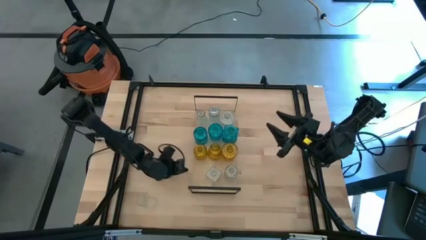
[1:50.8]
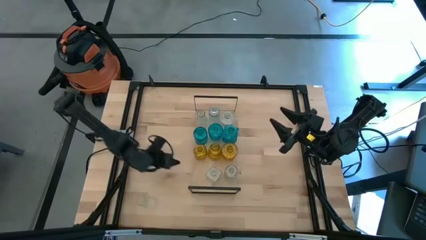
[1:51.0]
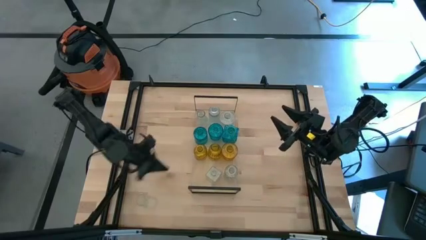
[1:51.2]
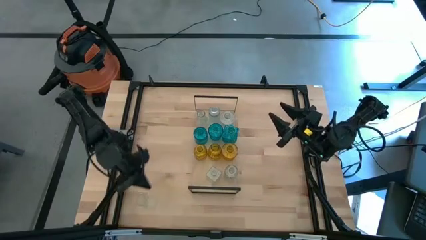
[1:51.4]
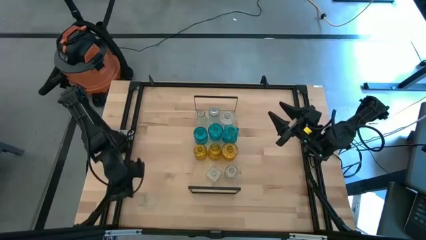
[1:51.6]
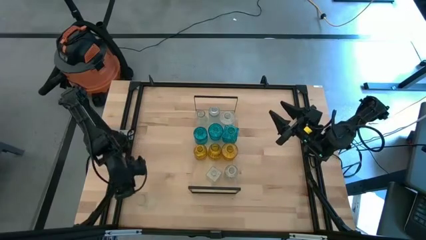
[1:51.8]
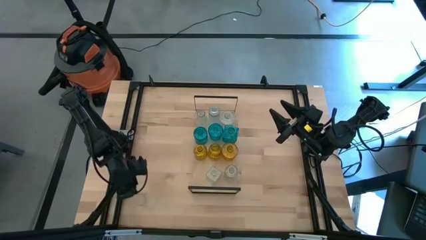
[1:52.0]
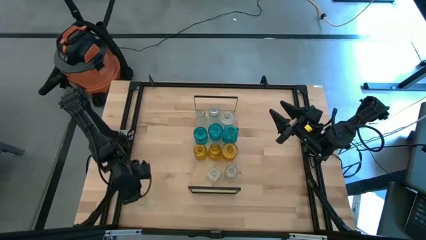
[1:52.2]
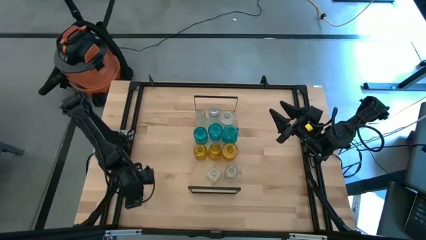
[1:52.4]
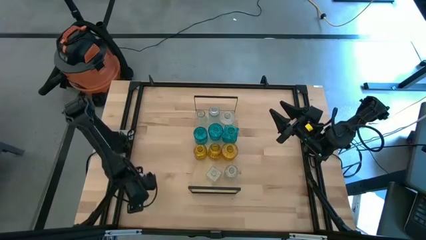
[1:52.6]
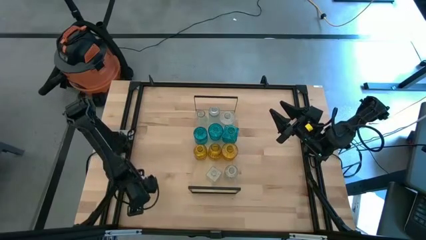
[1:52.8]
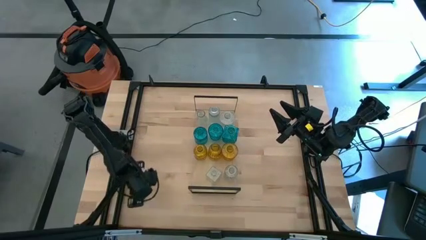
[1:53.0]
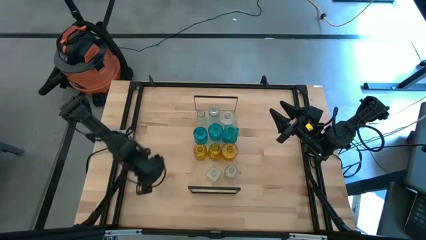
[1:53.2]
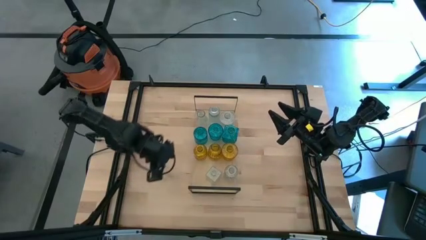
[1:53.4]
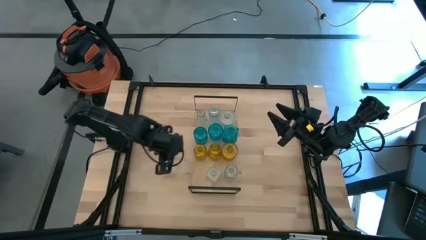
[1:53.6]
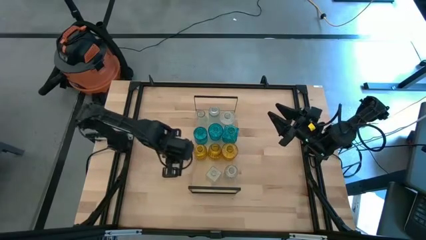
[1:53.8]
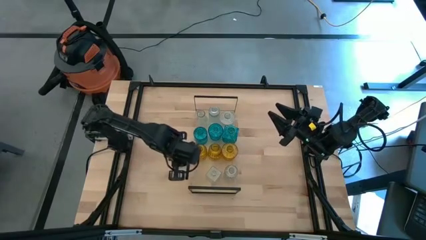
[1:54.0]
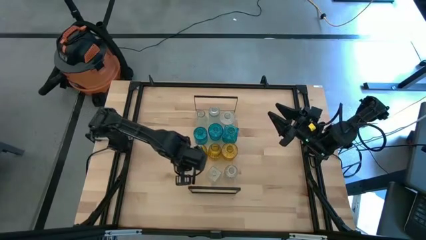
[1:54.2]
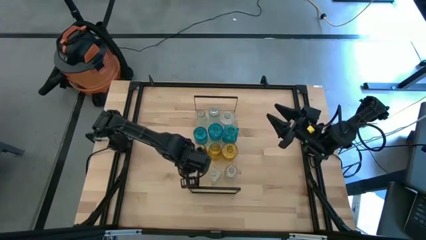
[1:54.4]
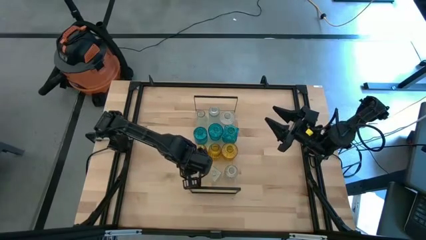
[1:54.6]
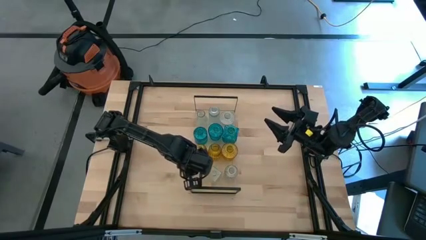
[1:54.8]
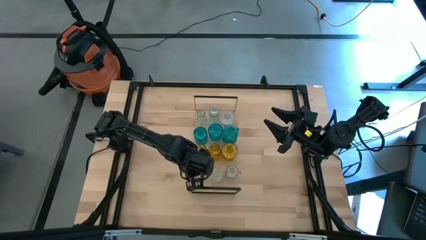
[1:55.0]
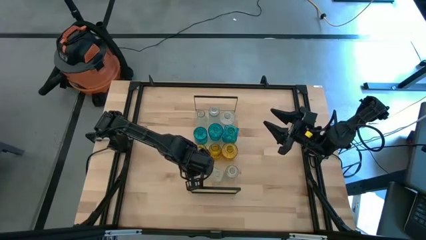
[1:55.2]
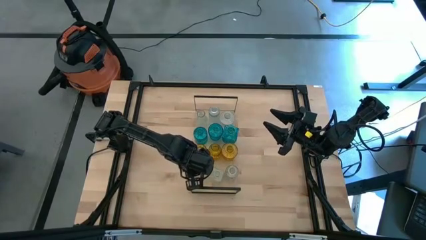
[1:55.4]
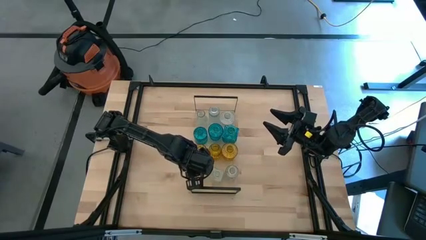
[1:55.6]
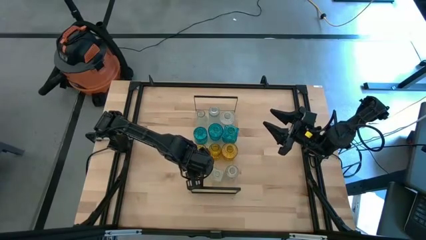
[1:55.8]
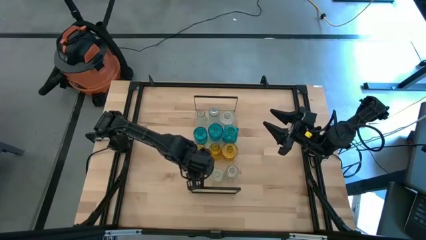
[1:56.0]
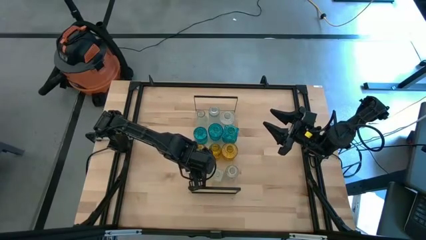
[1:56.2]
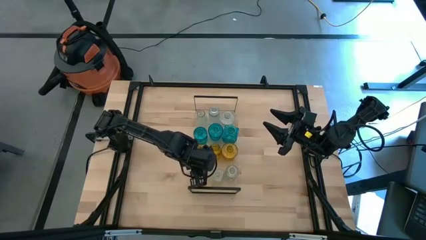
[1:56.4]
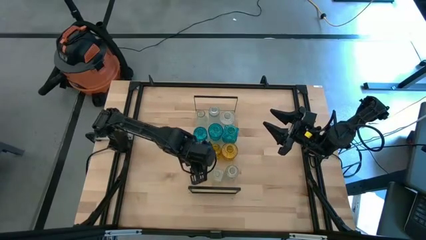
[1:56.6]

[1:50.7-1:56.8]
Task: sort vases onto shelf
Put the transparent vase on the shelf aligned with the other bottom transparent vase

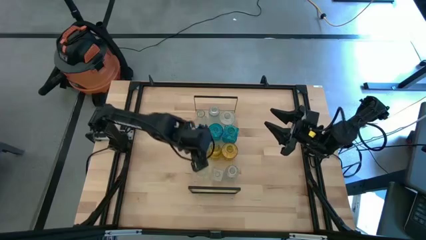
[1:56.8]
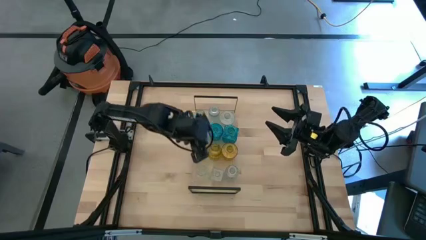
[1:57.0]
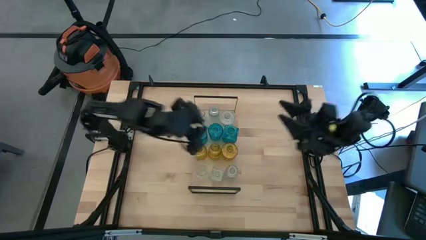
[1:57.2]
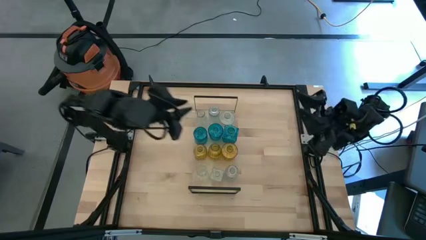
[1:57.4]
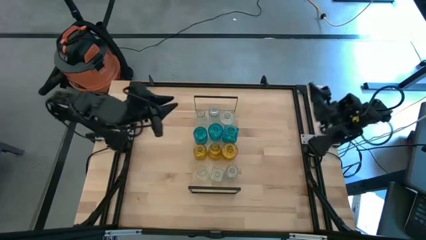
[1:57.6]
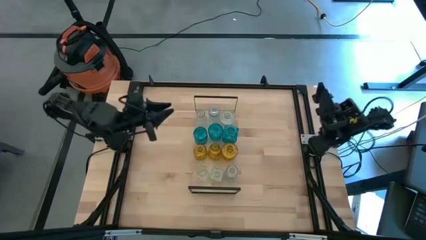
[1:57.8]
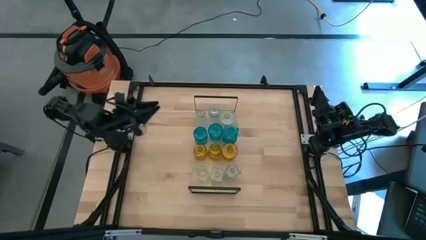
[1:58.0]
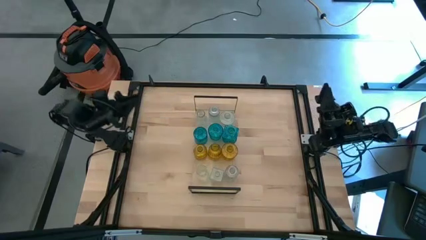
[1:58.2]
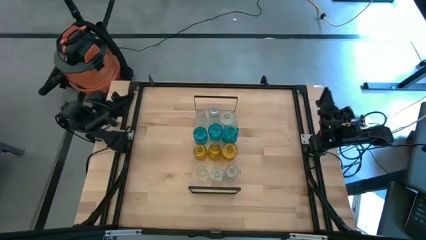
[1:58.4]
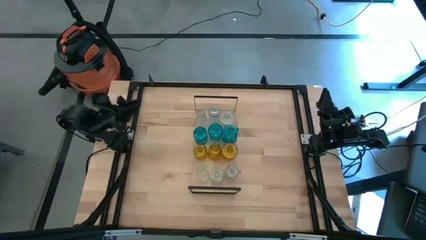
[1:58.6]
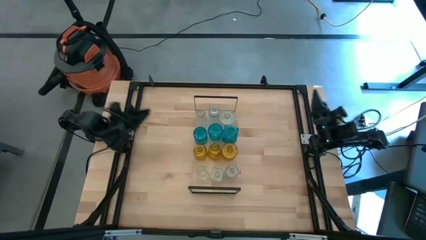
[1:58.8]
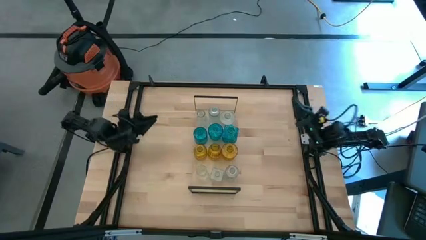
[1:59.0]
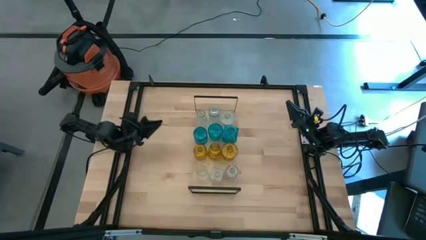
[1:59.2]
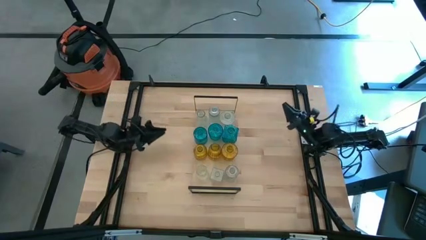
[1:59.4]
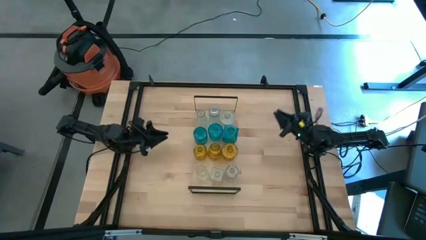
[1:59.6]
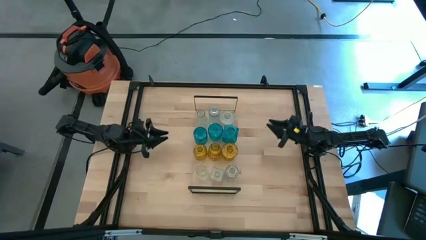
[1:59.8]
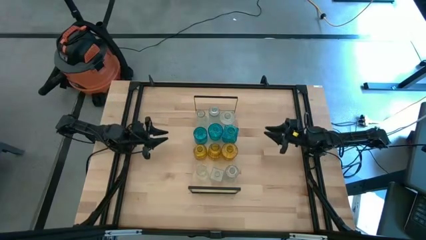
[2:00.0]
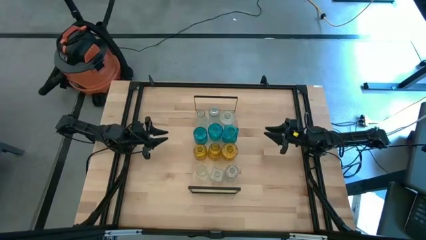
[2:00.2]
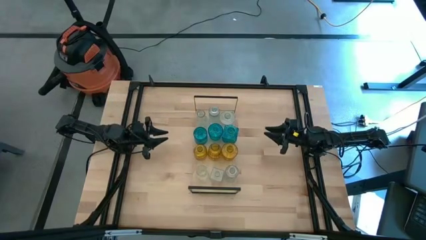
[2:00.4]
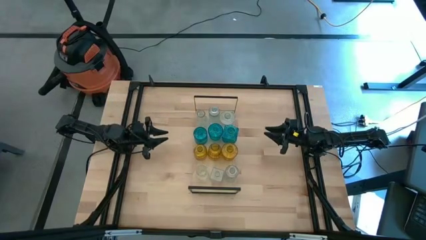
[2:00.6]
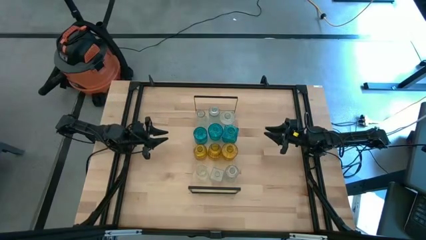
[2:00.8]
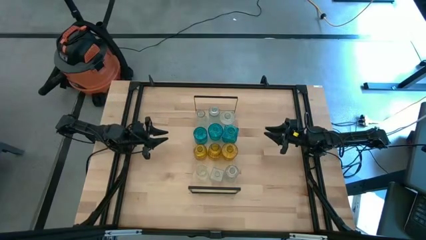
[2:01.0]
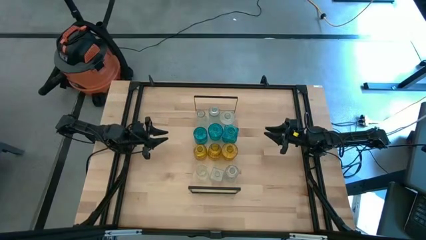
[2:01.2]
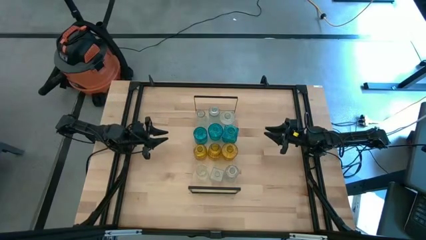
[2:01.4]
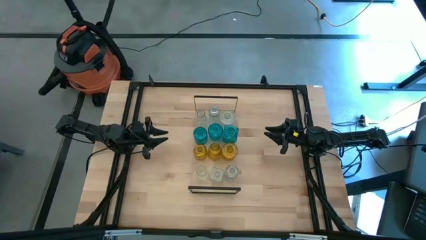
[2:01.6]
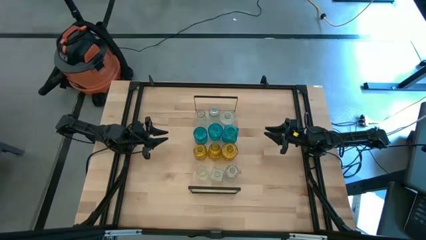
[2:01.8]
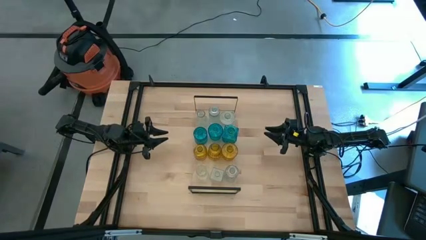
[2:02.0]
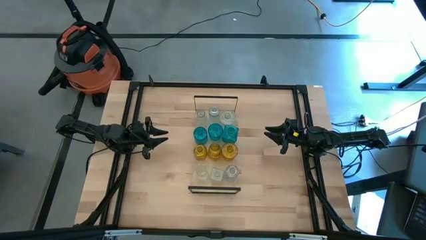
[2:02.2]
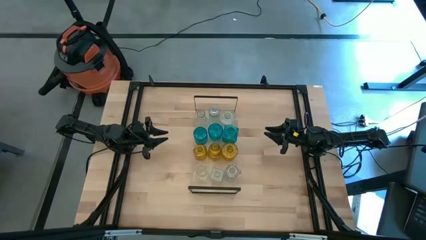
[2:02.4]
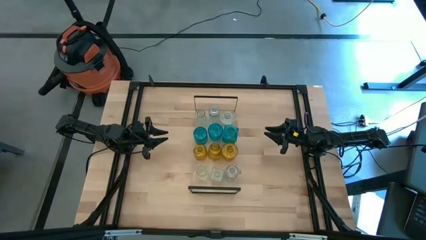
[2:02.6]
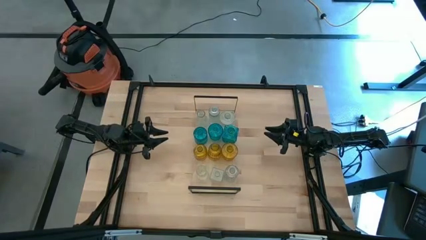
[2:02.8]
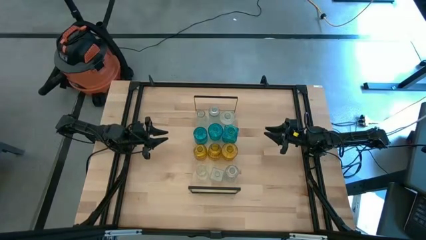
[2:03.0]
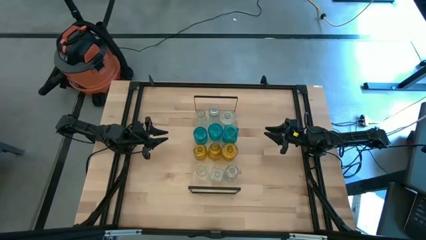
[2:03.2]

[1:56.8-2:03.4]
Return to Home Position
